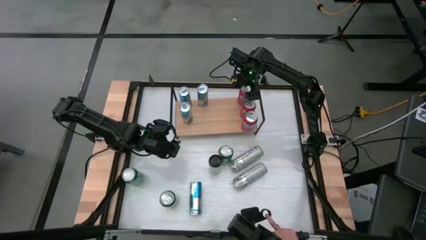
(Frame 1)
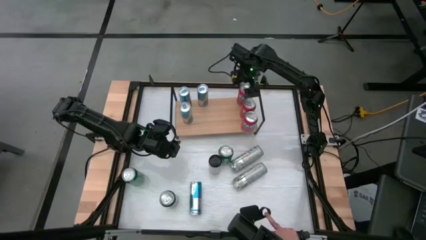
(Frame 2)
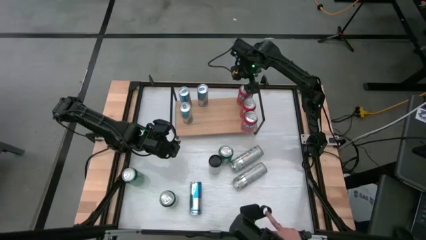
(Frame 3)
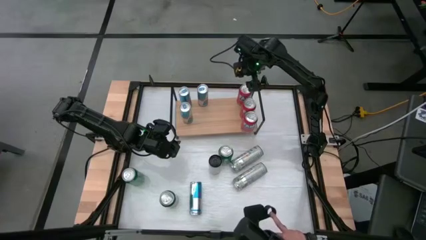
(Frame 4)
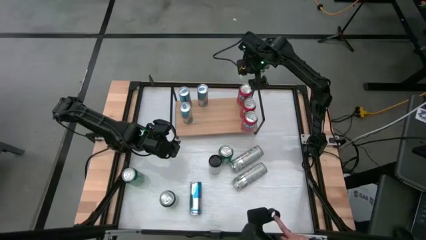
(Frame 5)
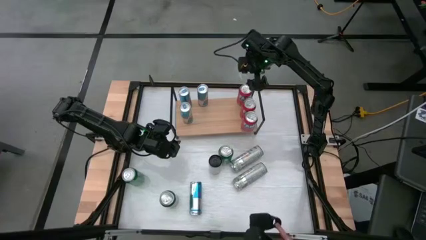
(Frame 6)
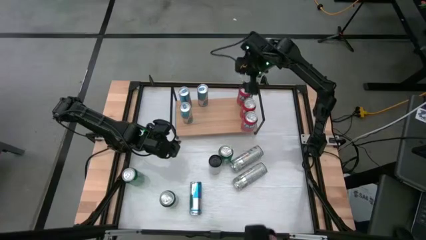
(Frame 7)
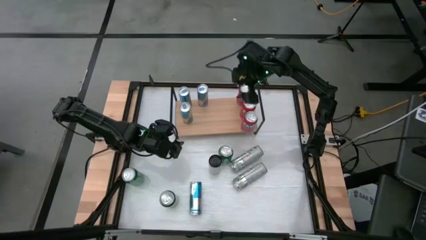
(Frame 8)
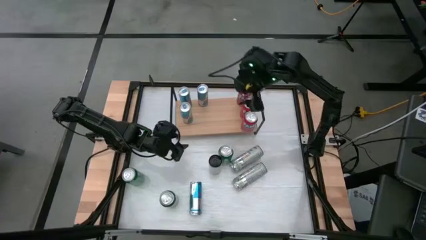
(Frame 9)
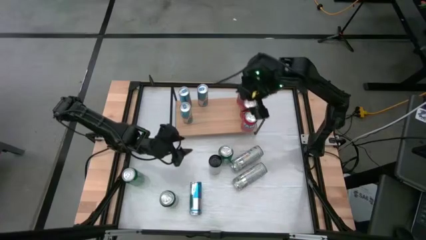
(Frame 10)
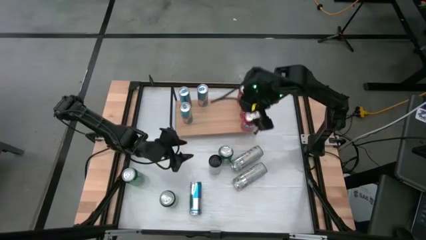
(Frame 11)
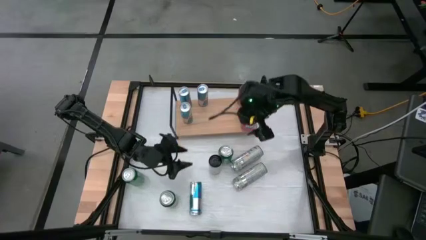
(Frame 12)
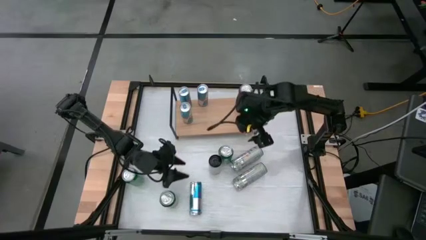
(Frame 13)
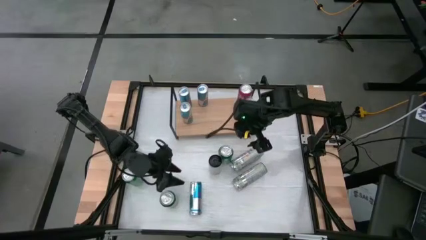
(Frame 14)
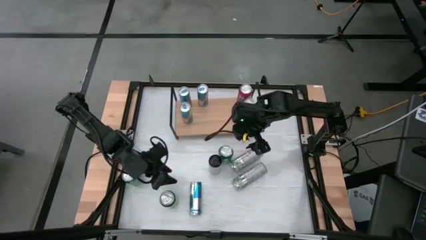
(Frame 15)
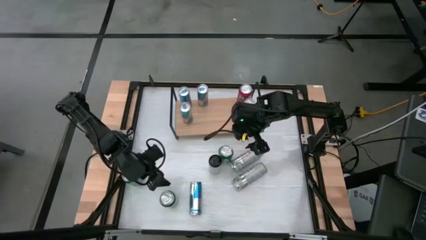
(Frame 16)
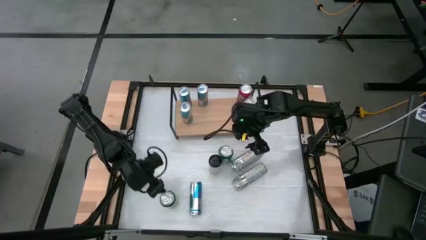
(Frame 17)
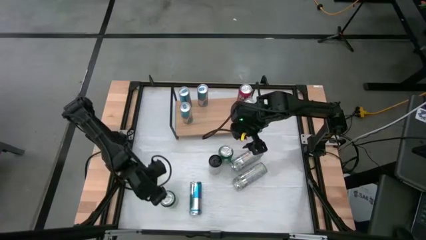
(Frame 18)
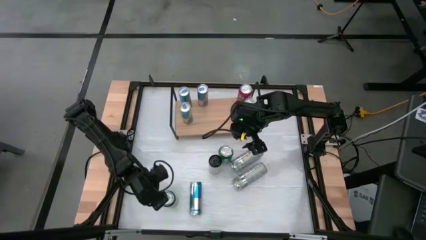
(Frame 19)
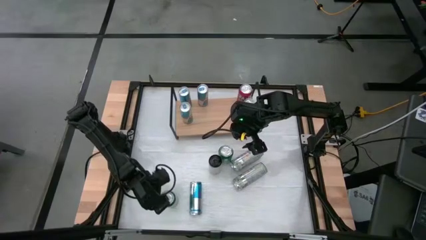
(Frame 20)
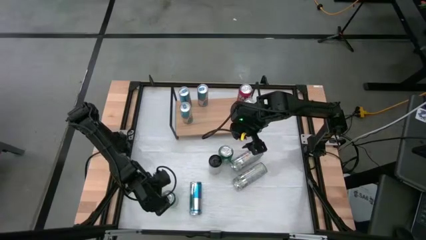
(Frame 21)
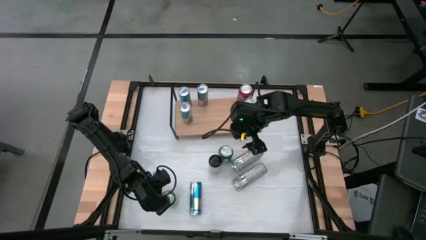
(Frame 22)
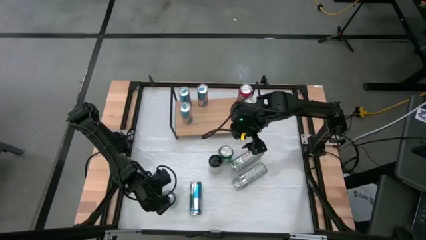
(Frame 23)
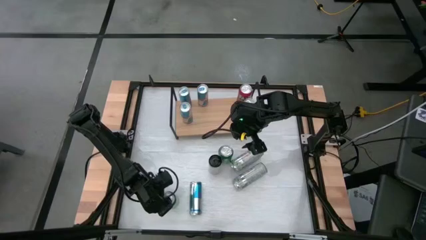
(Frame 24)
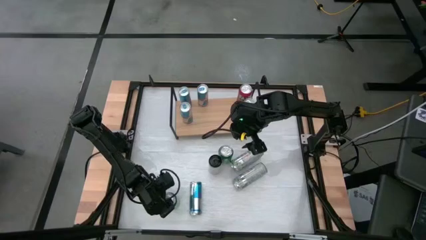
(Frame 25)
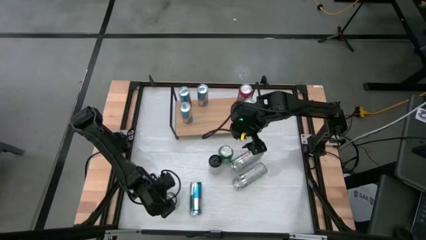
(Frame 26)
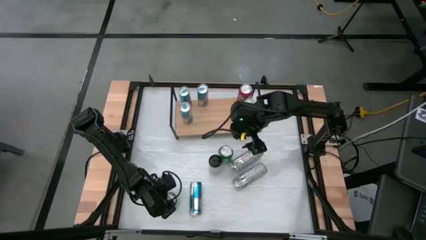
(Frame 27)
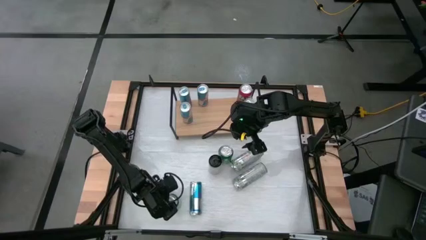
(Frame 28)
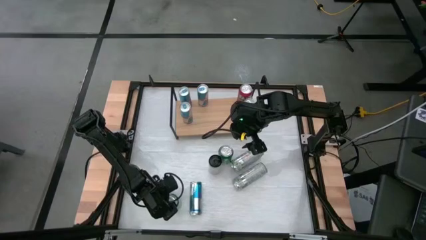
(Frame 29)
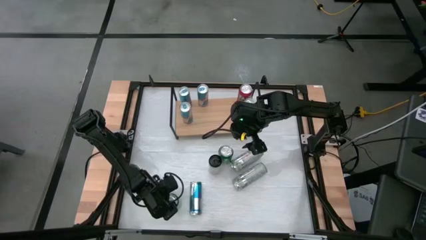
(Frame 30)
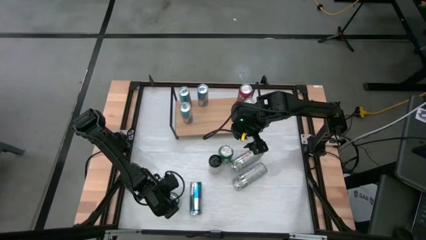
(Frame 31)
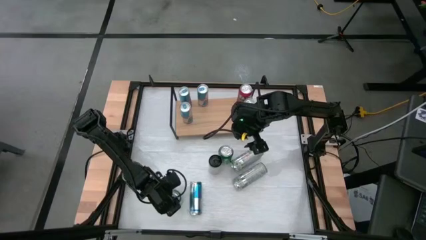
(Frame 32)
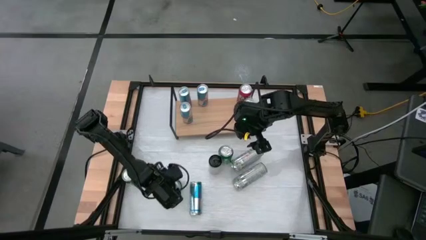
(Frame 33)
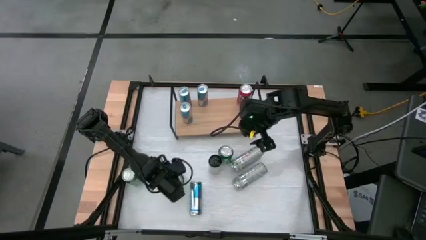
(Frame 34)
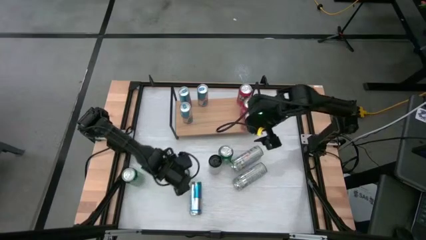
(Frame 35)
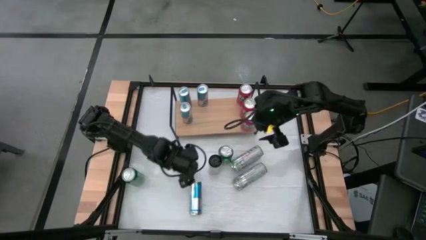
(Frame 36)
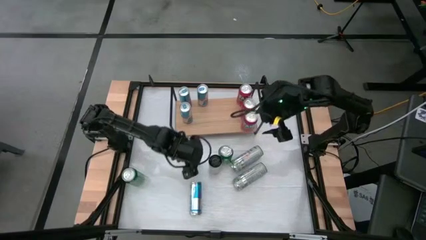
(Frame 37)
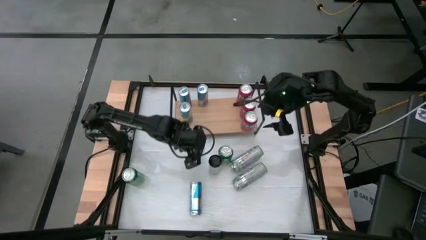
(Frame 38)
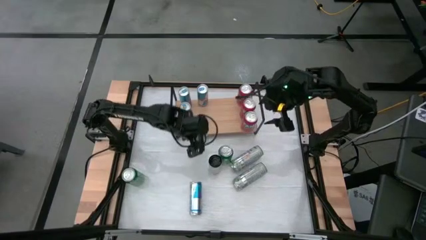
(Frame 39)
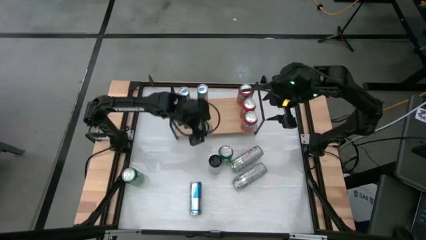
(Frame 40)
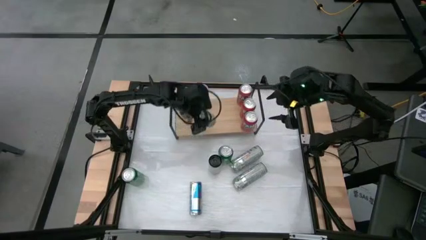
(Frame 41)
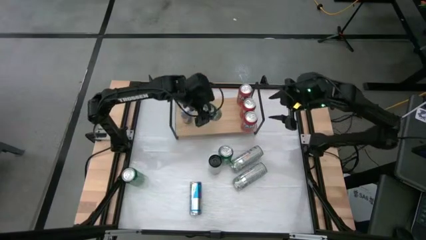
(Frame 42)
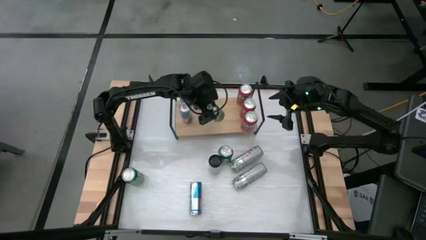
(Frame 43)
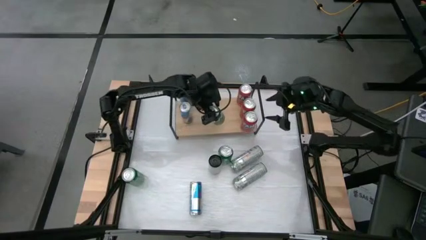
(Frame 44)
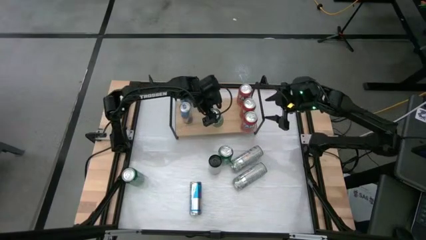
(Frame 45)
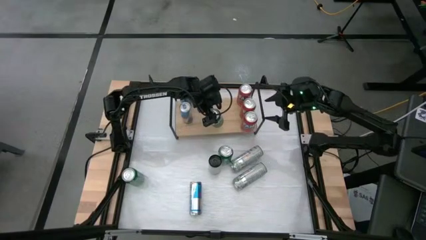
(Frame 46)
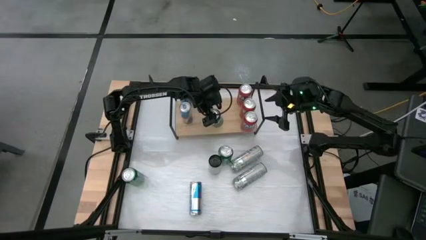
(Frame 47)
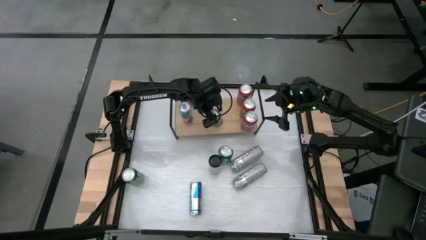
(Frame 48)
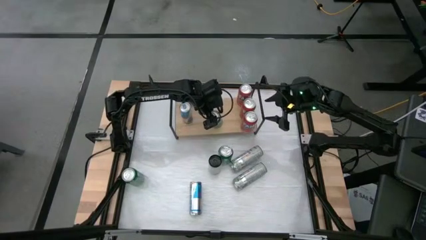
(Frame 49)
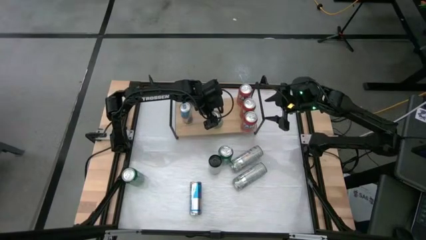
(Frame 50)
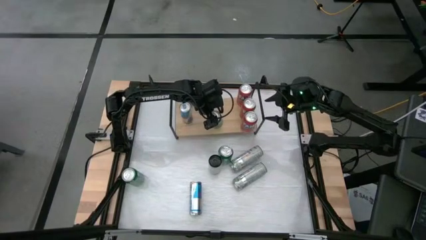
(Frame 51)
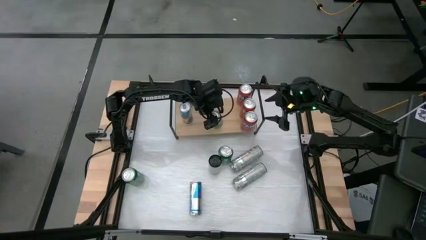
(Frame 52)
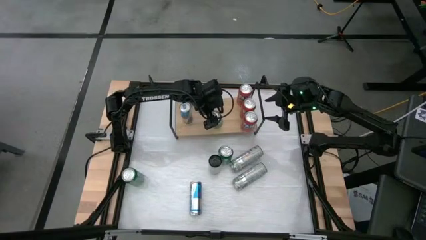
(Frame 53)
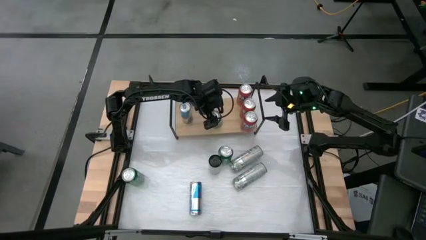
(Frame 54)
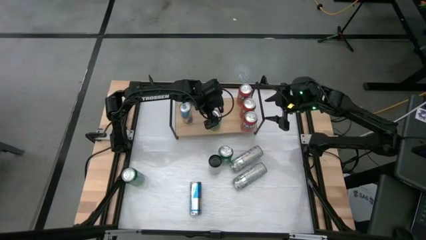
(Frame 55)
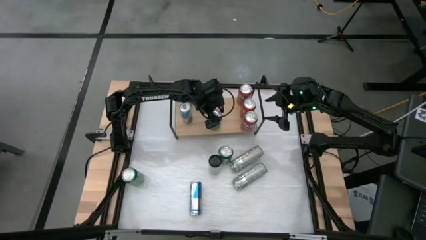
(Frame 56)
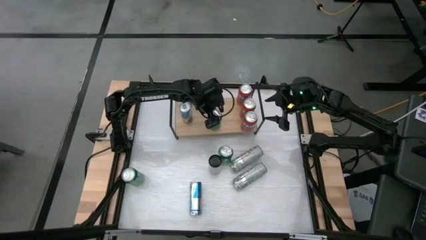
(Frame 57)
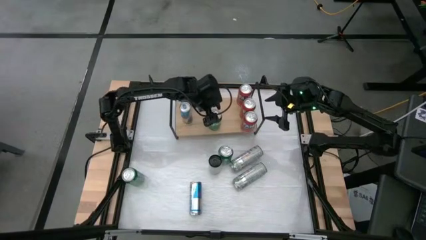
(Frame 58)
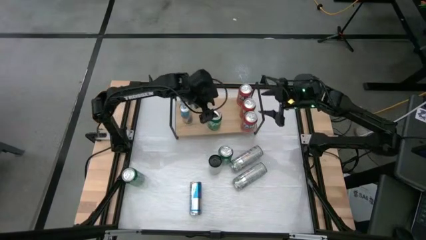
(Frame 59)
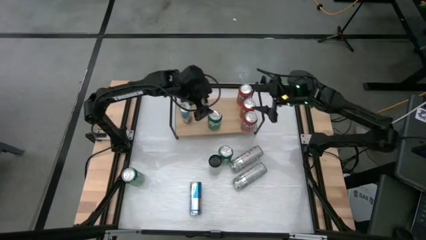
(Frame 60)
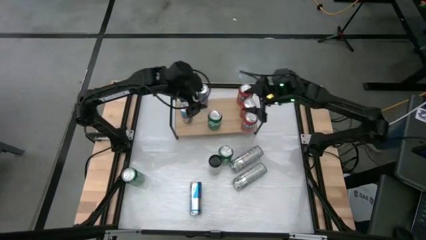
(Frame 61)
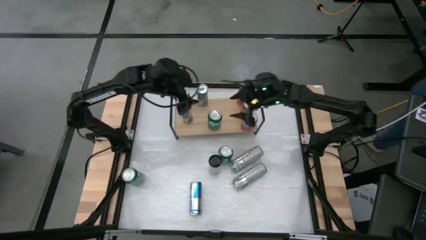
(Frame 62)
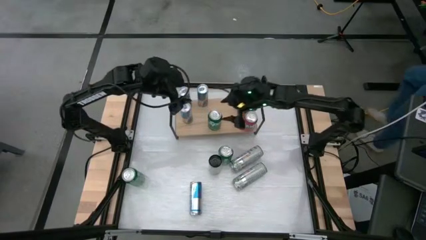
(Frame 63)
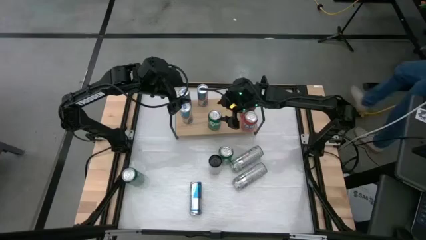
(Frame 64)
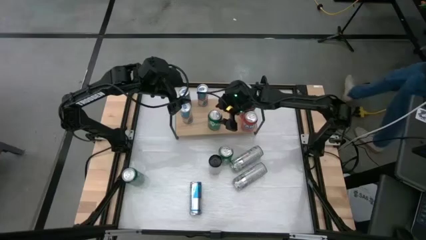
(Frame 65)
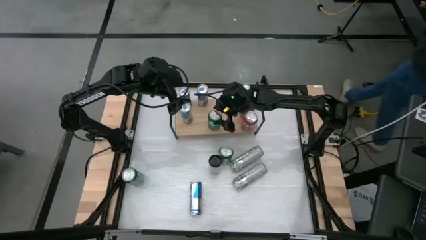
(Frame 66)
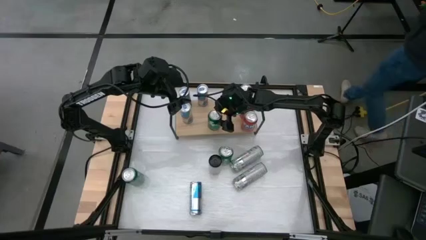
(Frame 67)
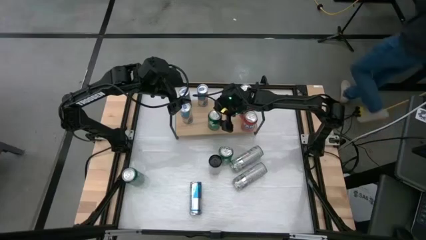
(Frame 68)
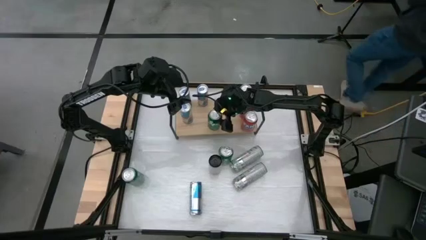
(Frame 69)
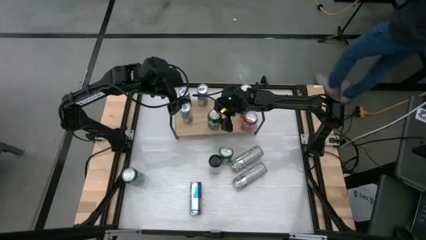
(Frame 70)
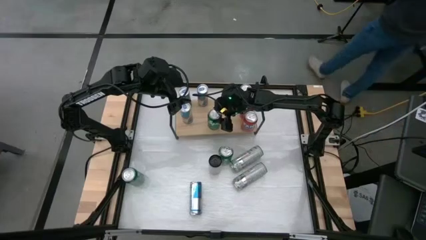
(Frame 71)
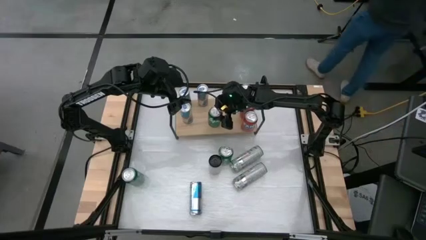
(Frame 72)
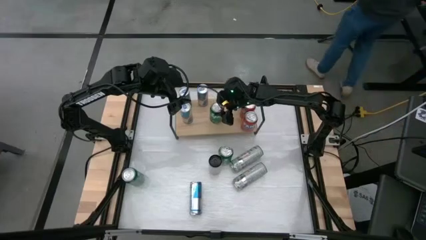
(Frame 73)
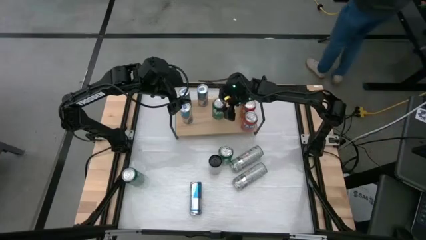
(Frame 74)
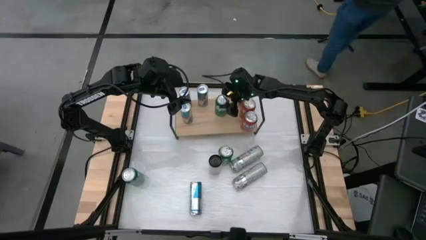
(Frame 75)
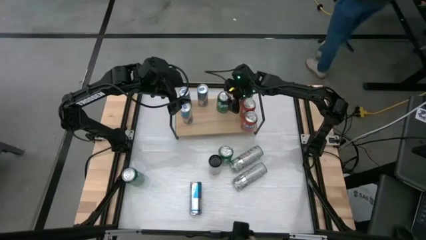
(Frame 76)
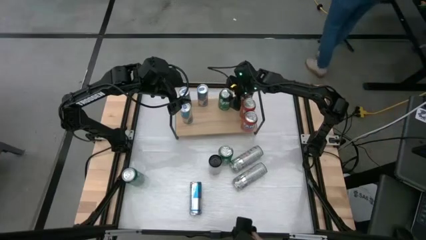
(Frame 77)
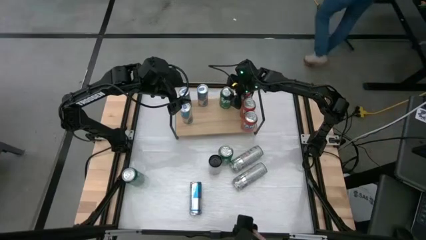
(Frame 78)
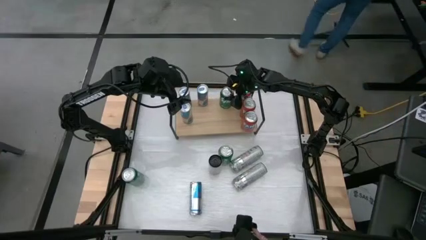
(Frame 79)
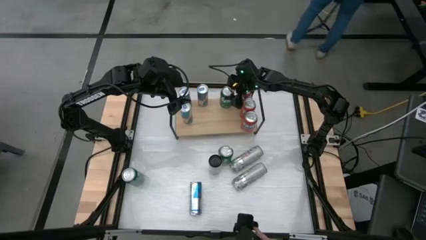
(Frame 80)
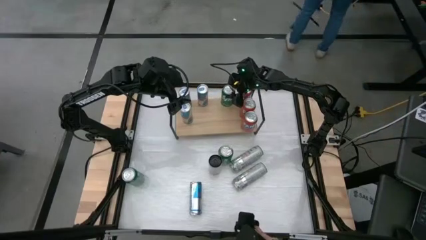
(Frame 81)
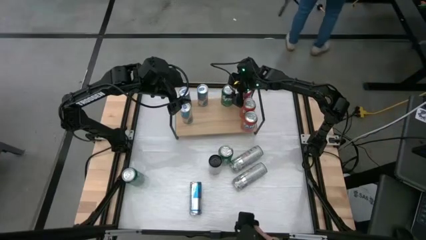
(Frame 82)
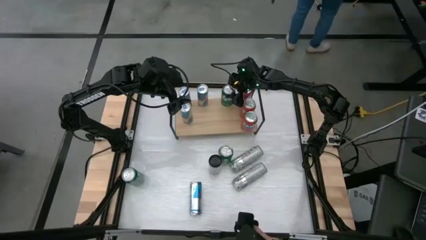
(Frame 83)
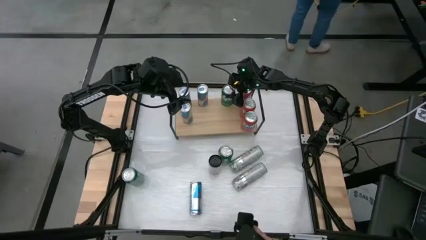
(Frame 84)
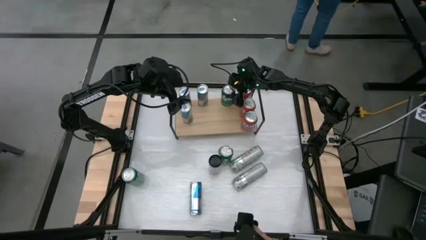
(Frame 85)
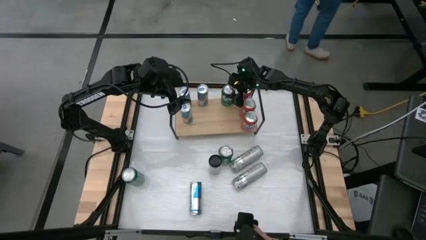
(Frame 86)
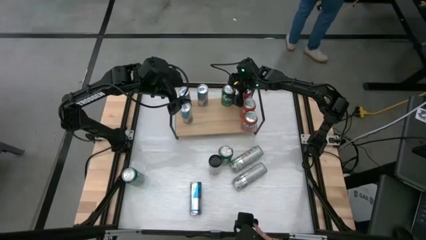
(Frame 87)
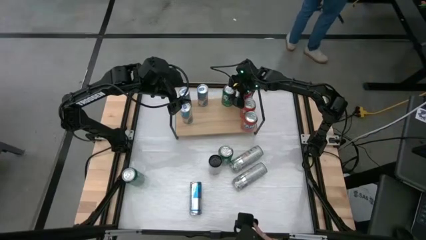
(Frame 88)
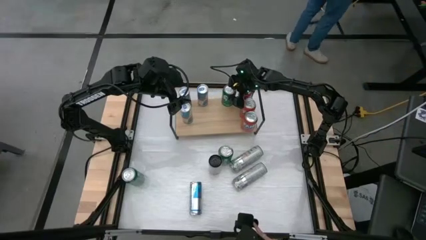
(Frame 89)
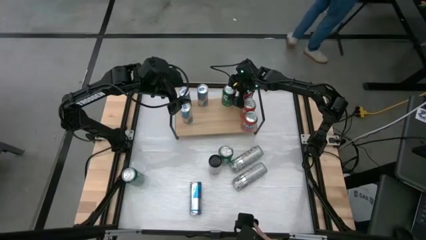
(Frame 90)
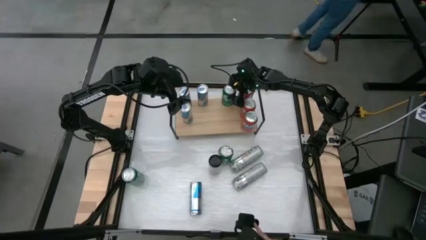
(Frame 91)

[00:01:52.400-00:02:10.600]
Task: Sort soda cans
Put the green soda can on the shelf
